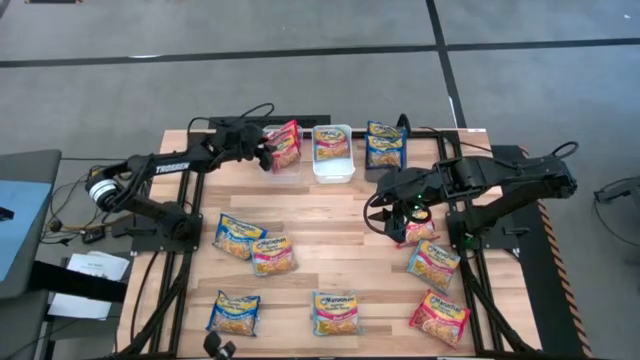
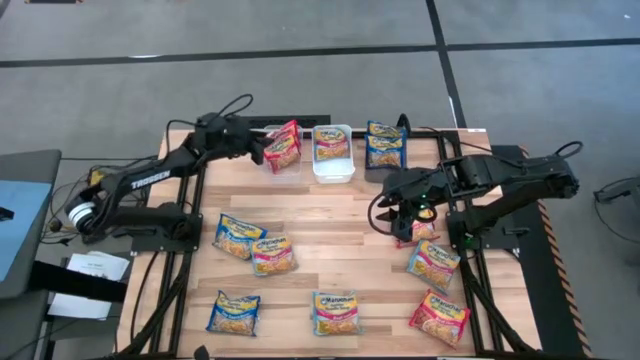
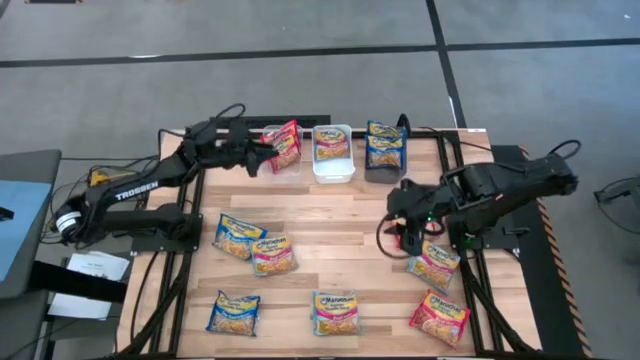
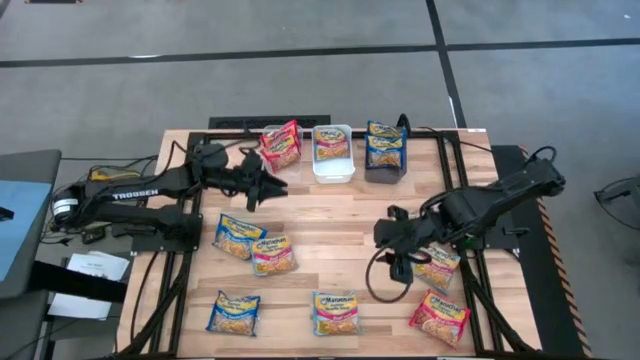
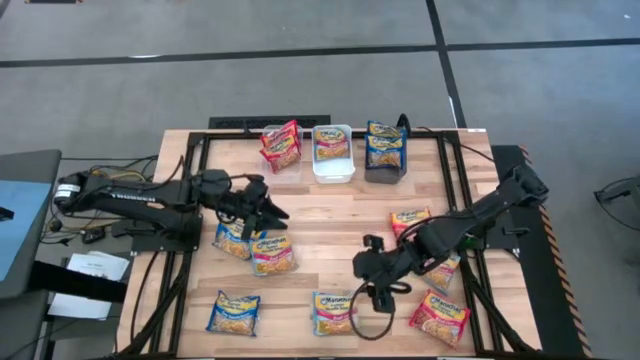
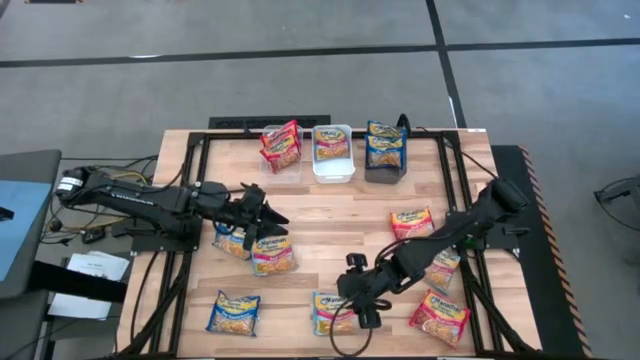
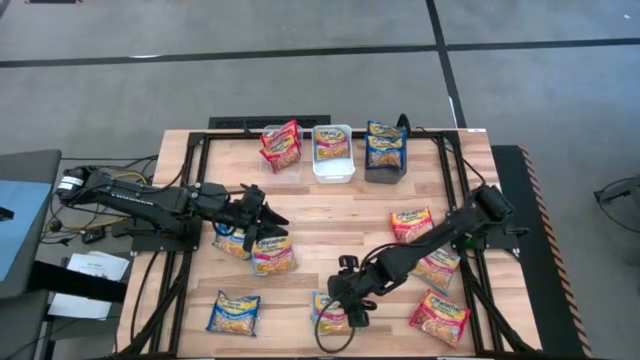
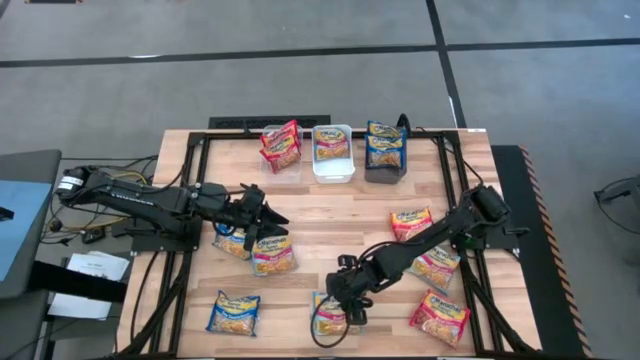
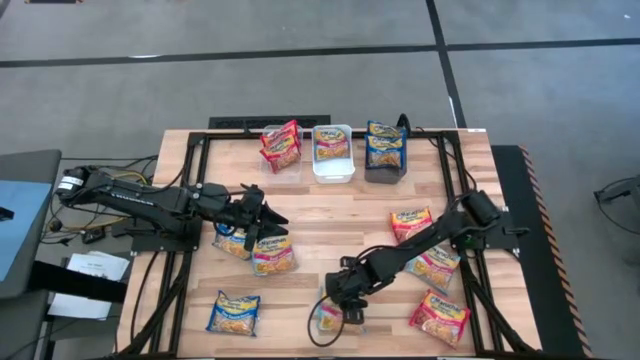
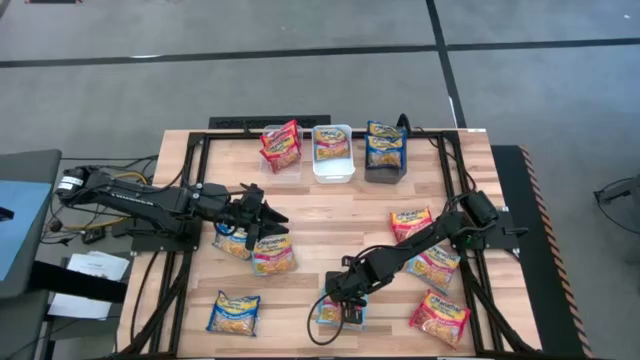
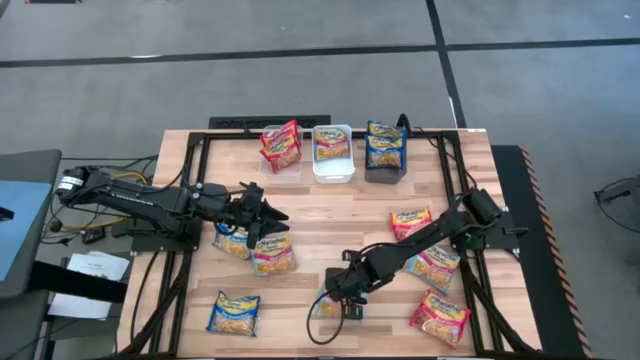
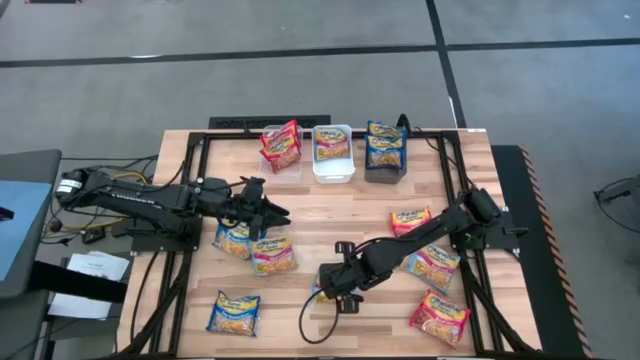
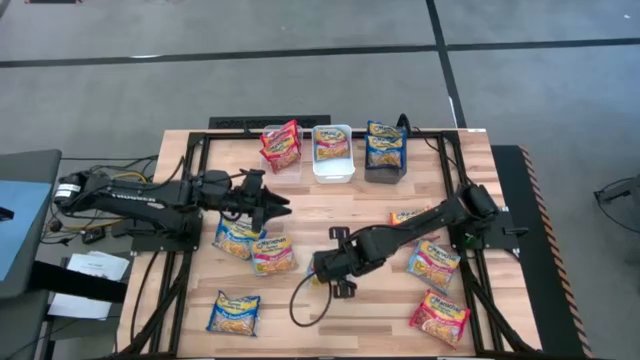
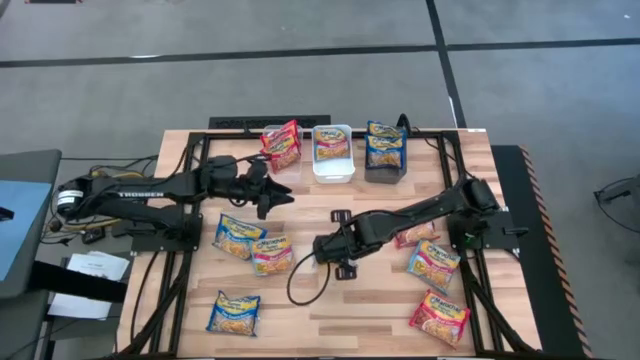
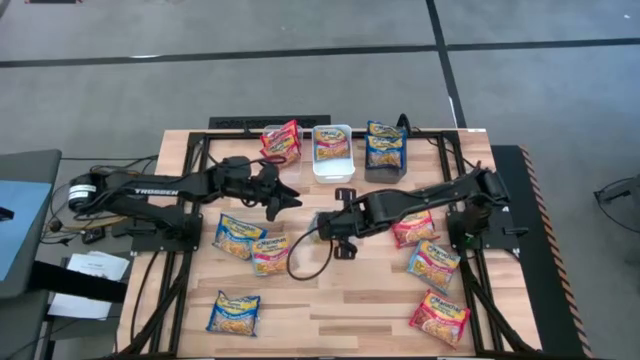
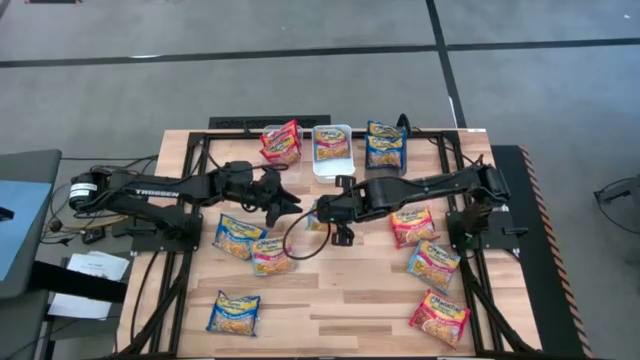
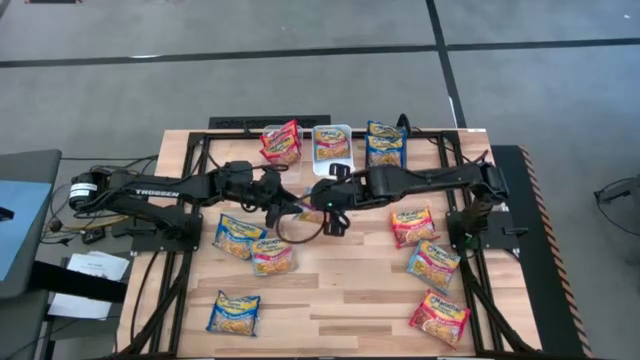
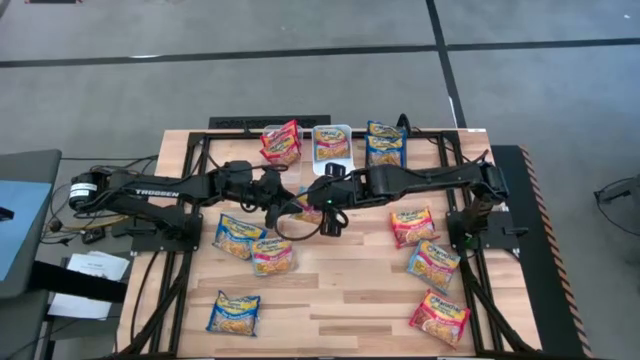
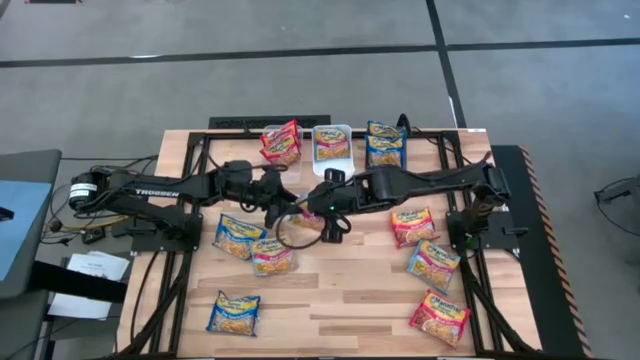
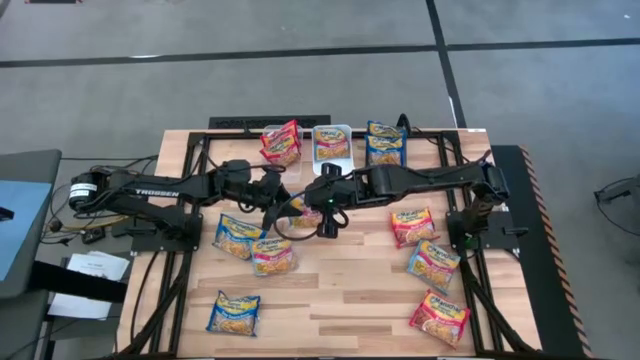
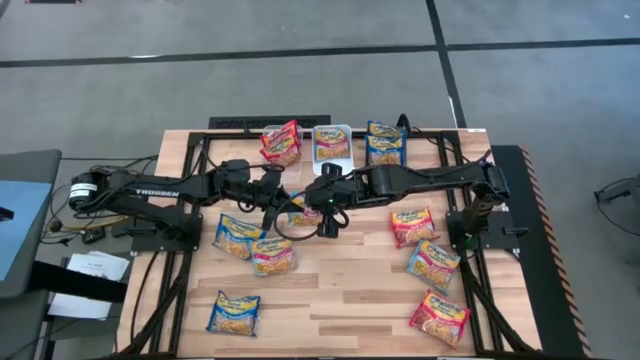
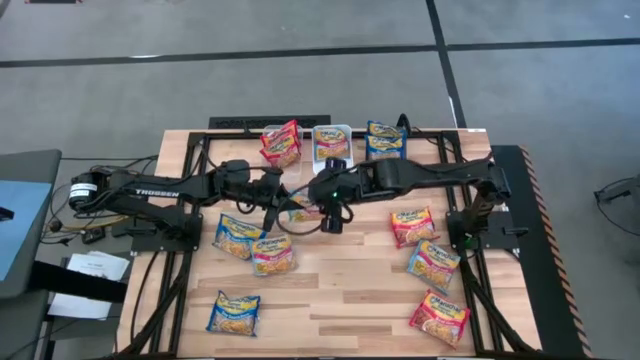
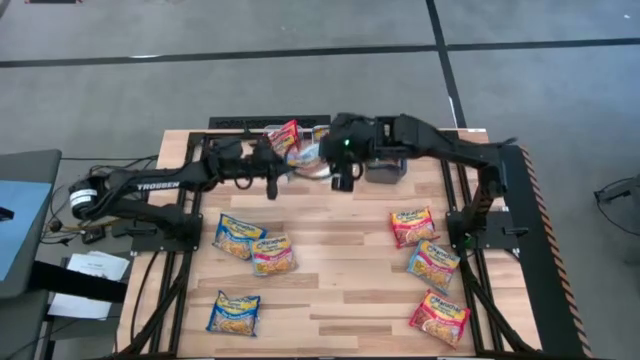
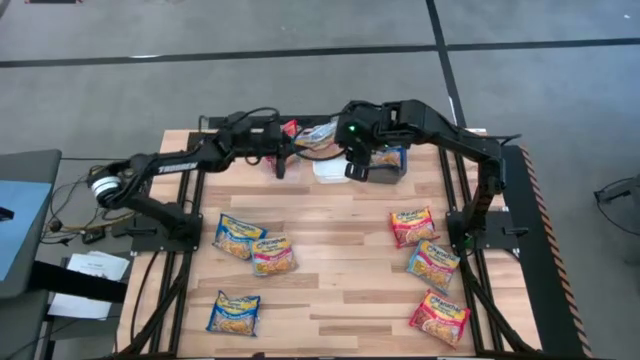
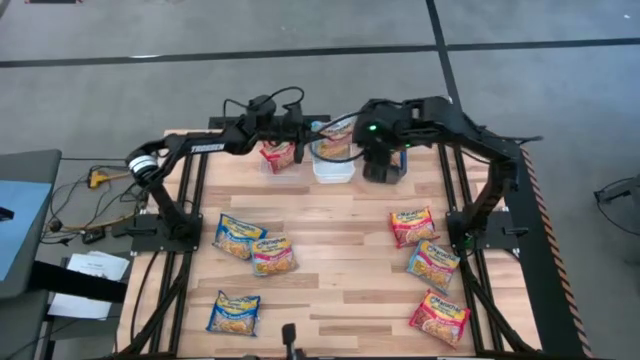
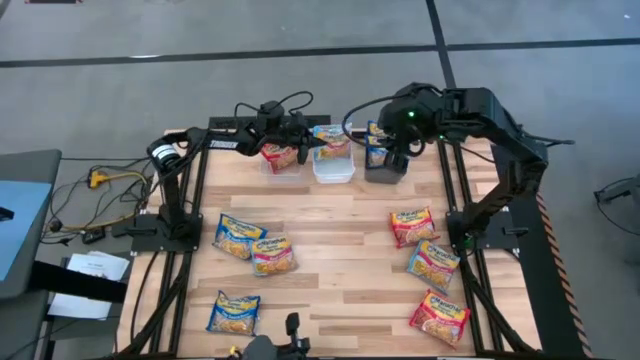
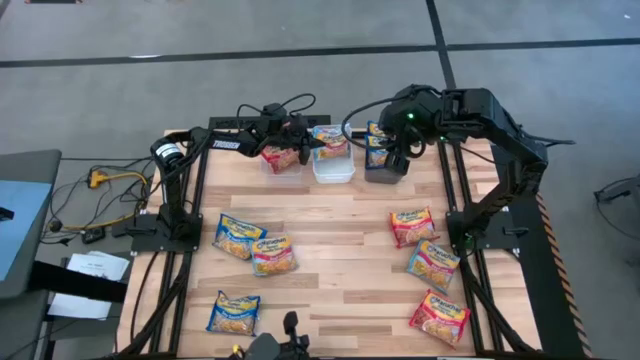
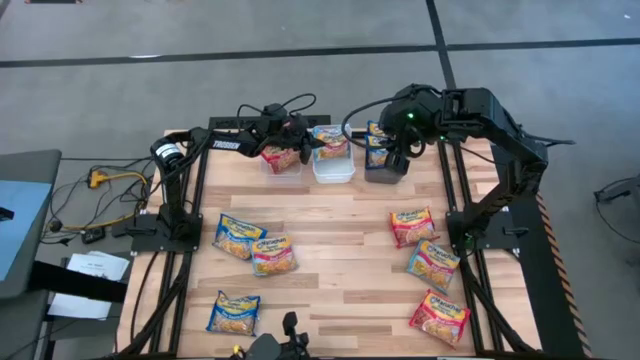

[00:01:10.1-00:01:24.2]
Task: Sort Maruchan noodles
Put the light blue noodle pack into the white bin

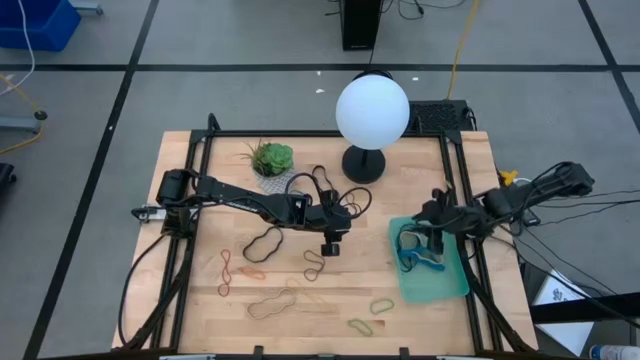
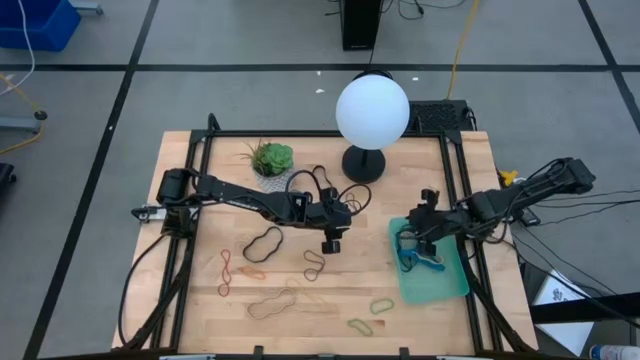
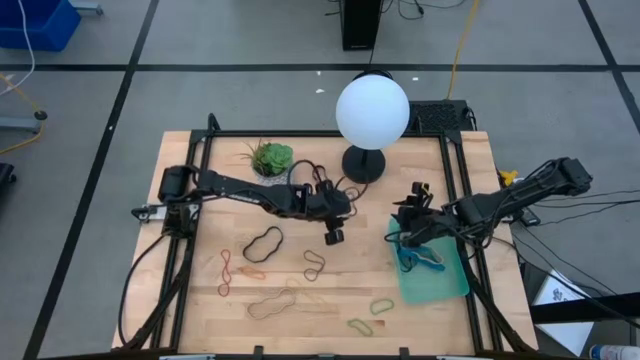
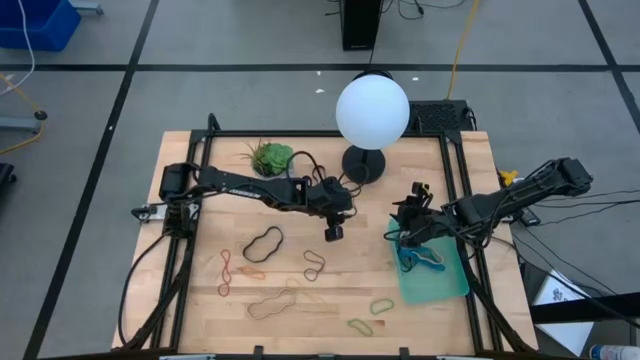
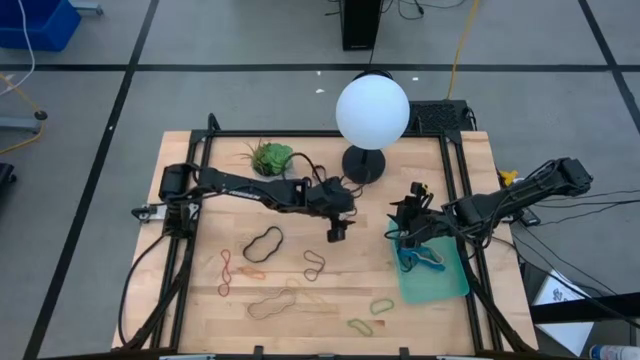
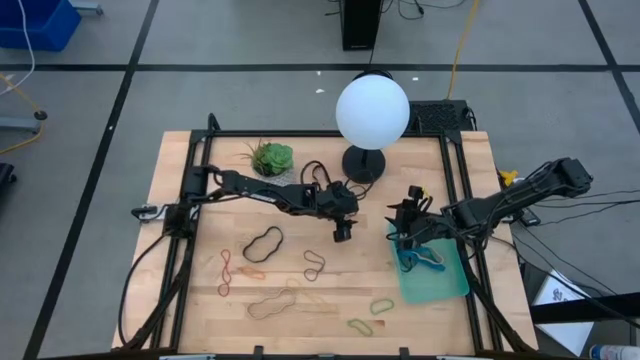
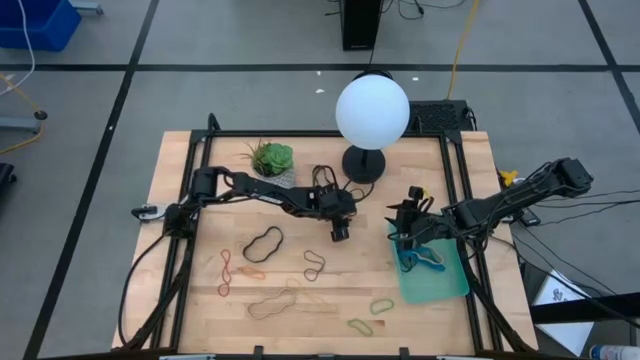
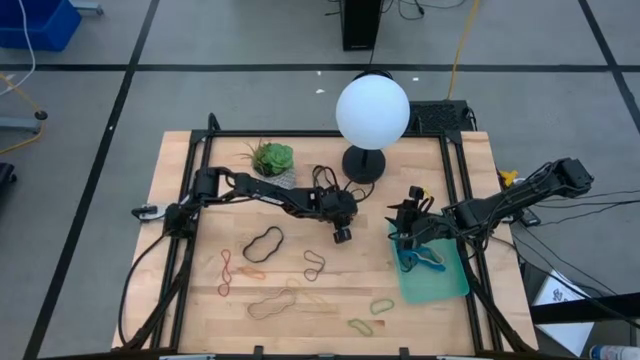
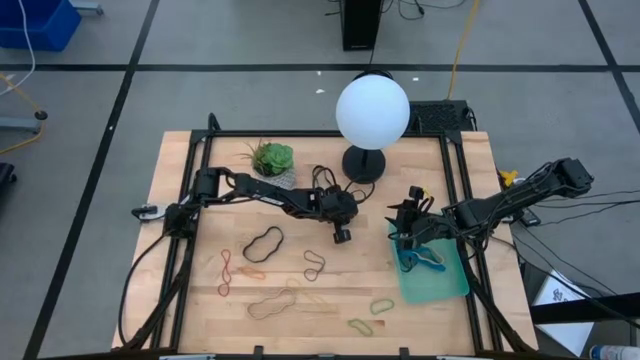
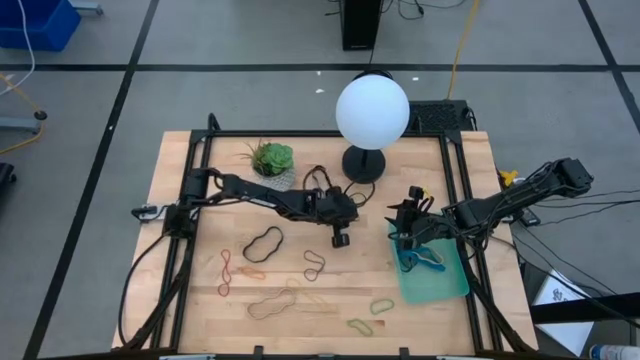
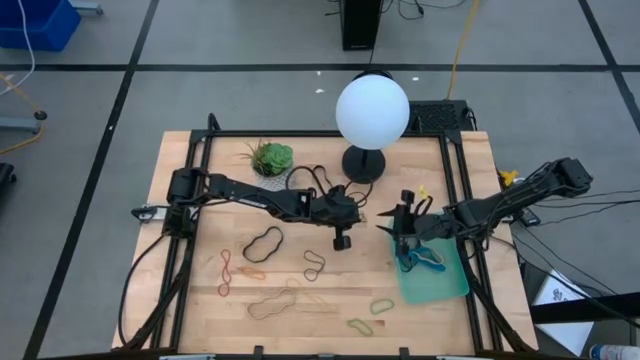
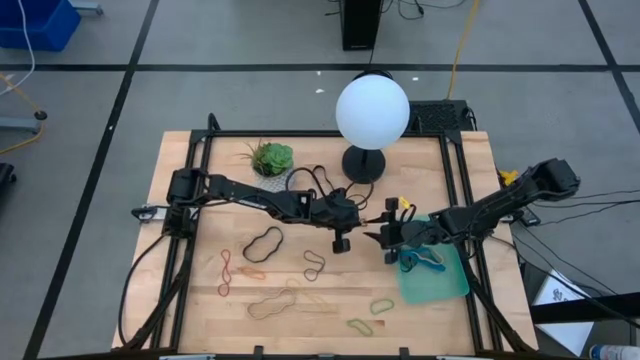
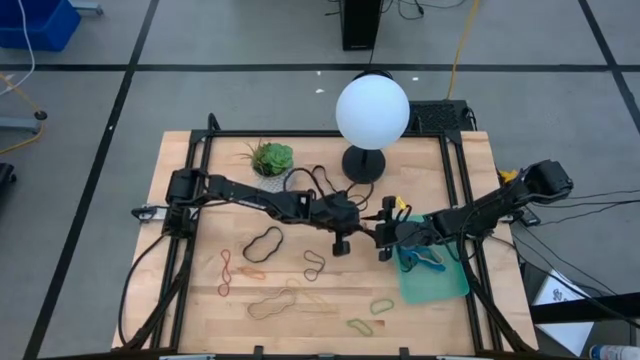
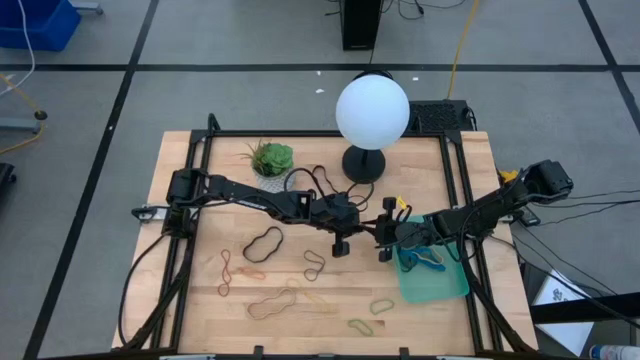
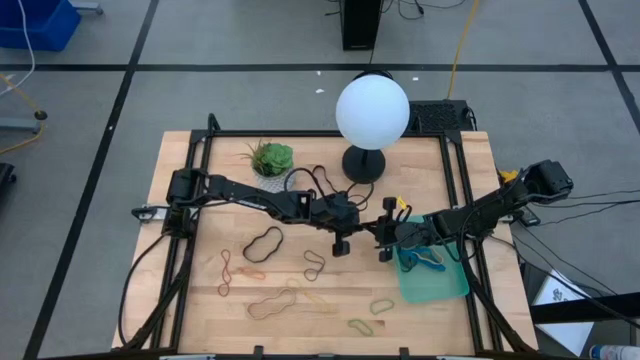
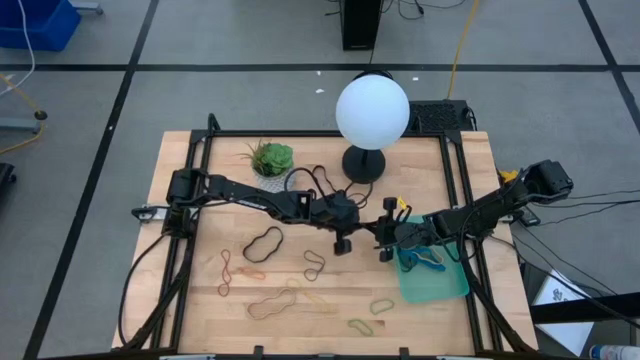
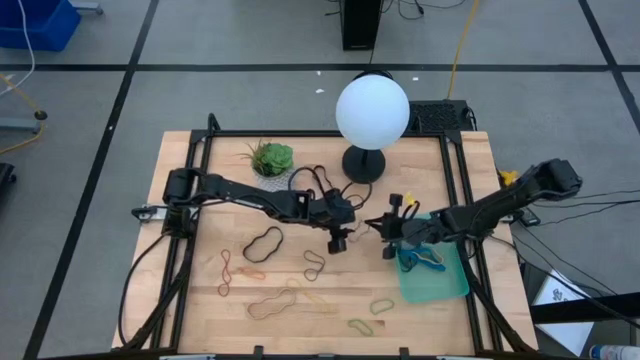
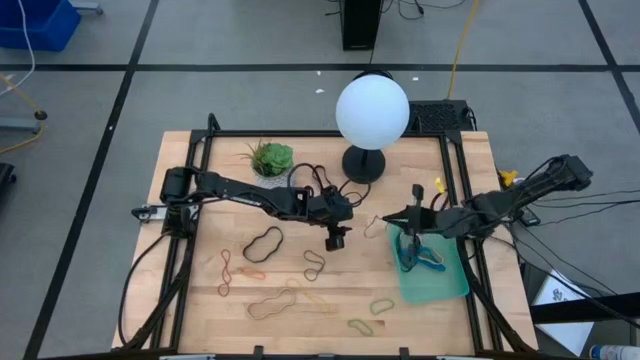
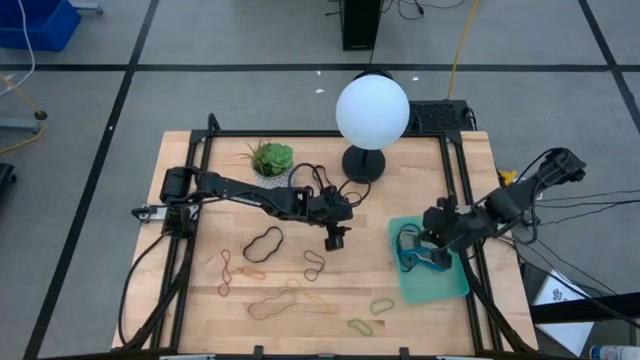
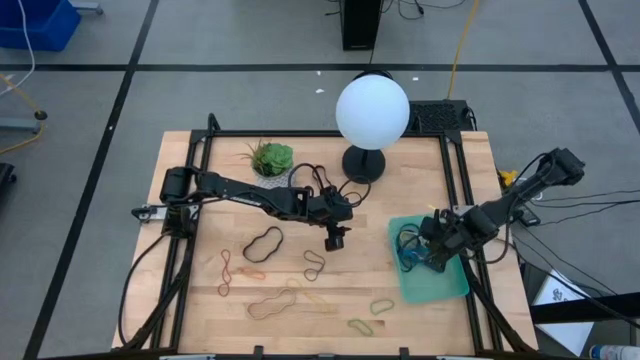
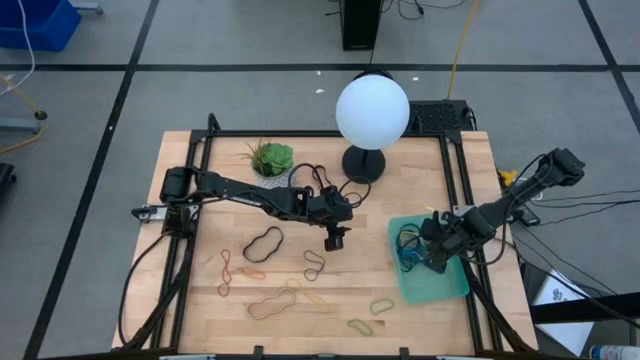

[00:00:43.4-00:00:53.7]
Task: Pick and place rubber bands into bin
Put the top purple rubber band into the bin
